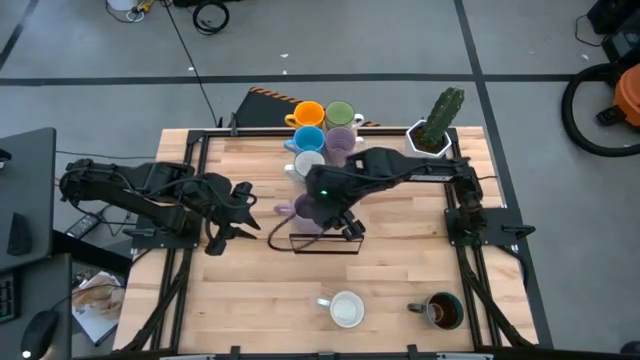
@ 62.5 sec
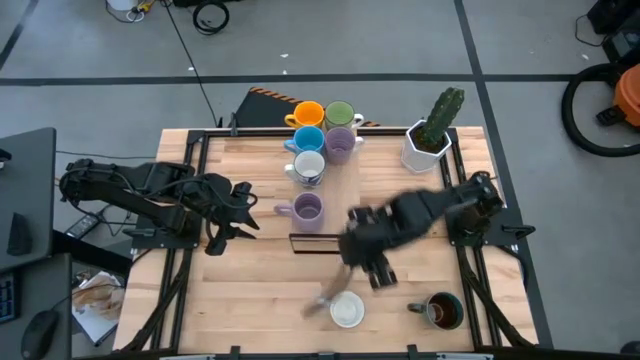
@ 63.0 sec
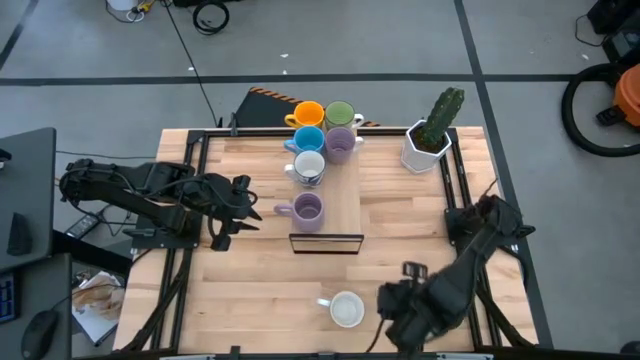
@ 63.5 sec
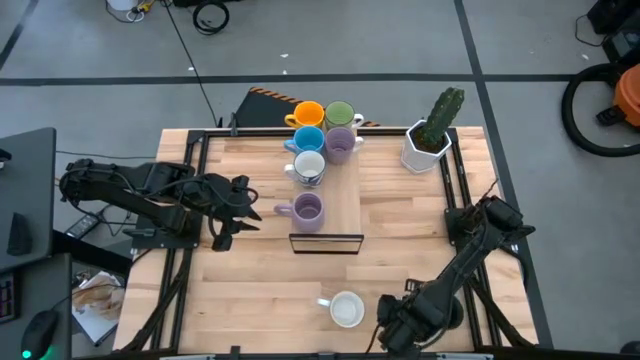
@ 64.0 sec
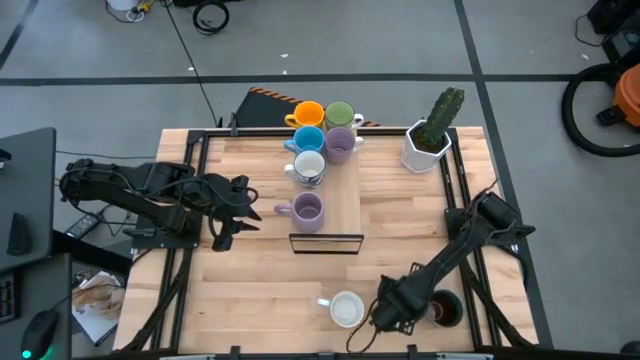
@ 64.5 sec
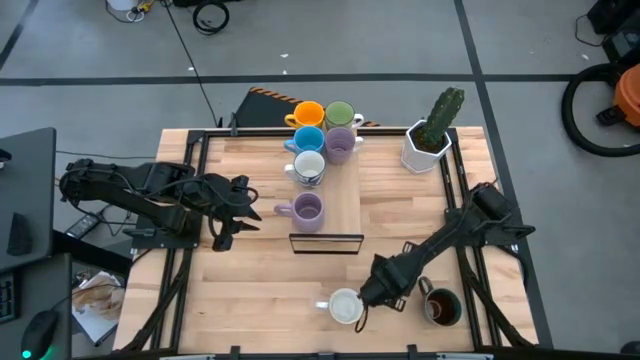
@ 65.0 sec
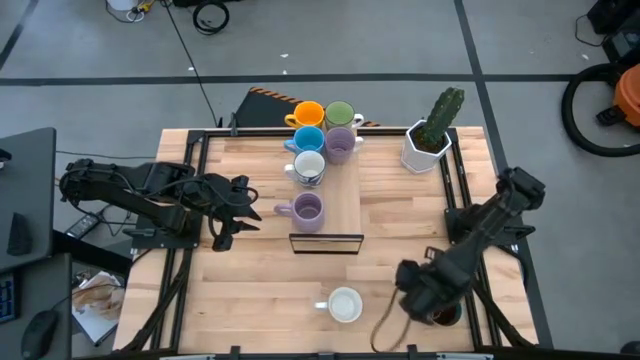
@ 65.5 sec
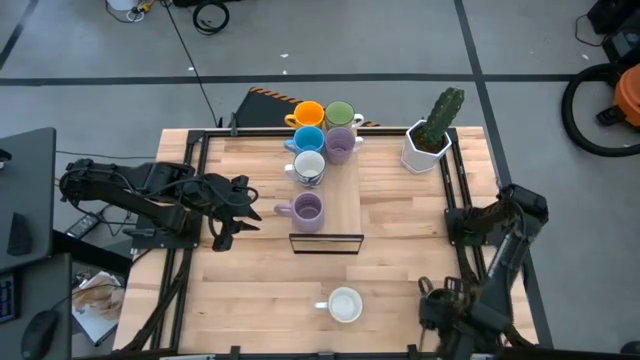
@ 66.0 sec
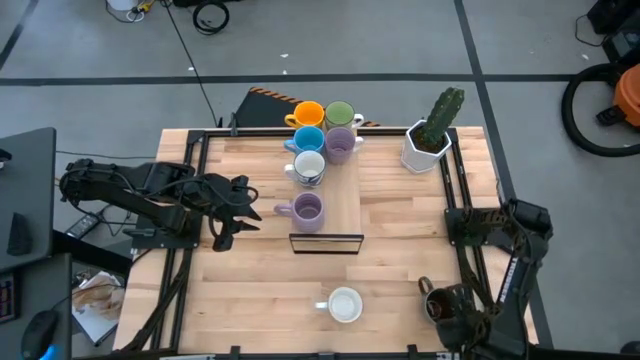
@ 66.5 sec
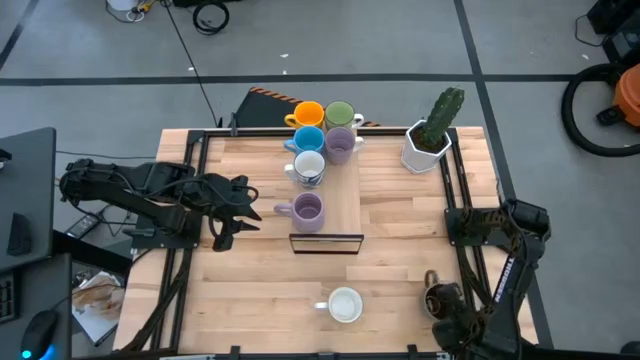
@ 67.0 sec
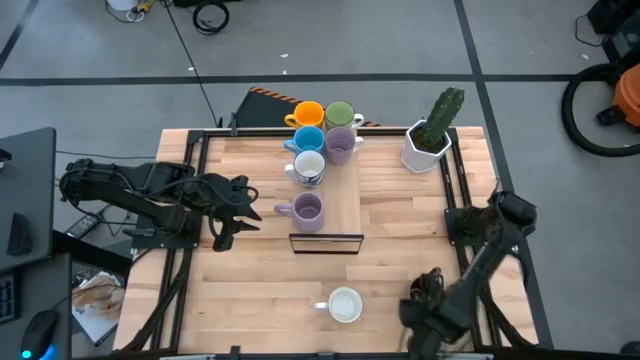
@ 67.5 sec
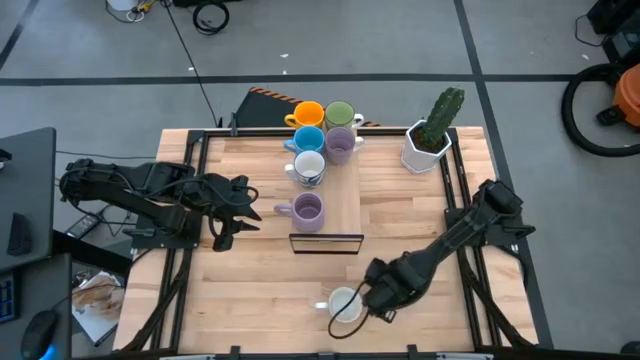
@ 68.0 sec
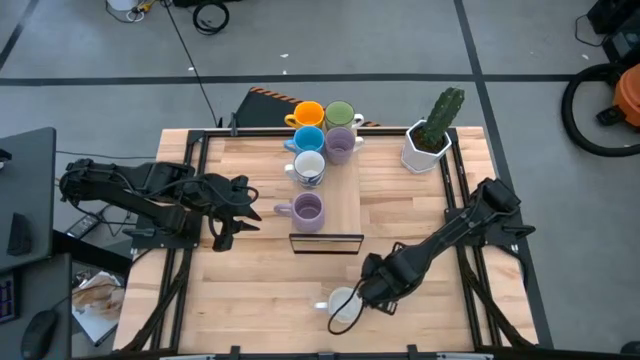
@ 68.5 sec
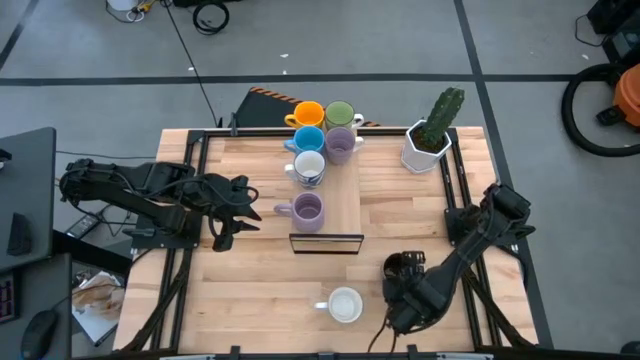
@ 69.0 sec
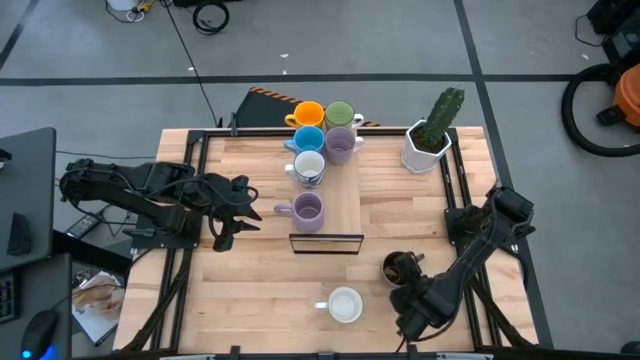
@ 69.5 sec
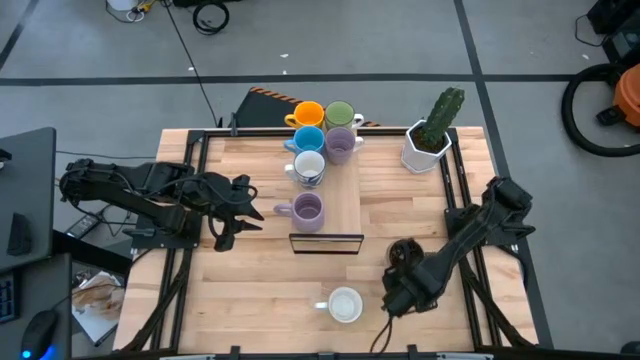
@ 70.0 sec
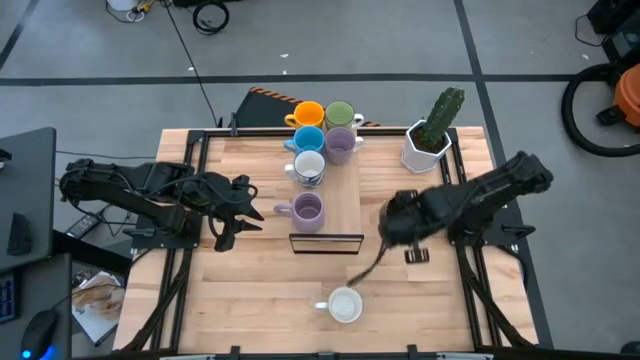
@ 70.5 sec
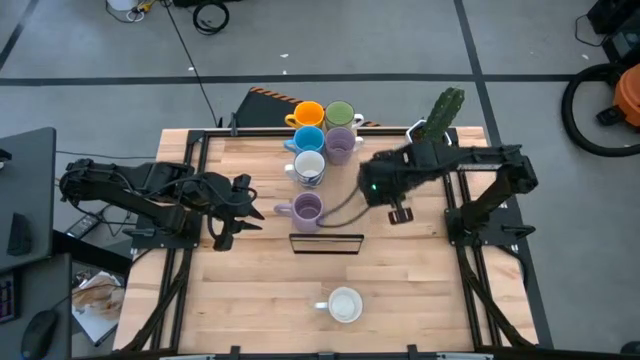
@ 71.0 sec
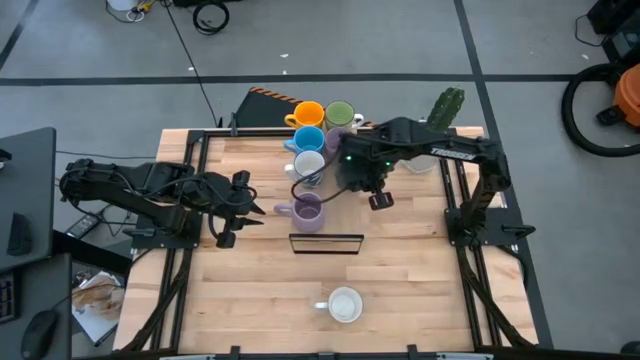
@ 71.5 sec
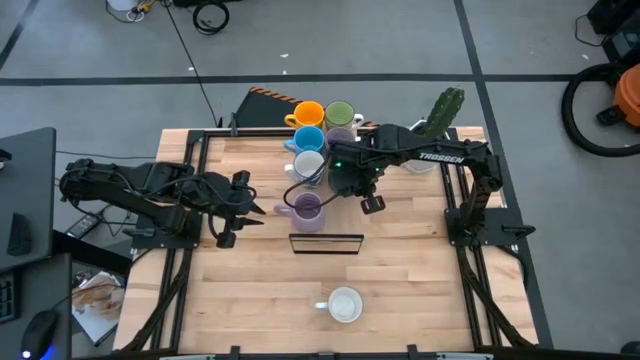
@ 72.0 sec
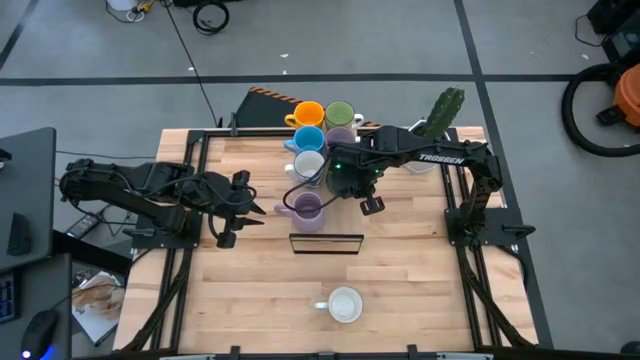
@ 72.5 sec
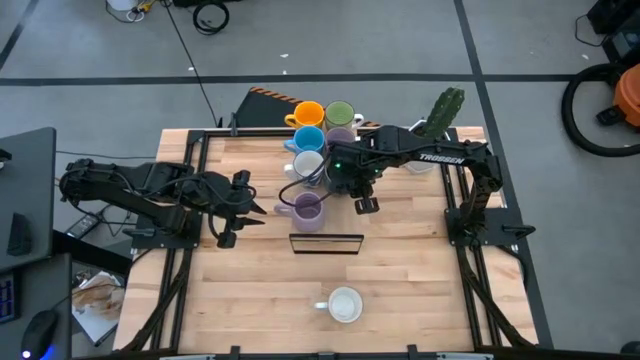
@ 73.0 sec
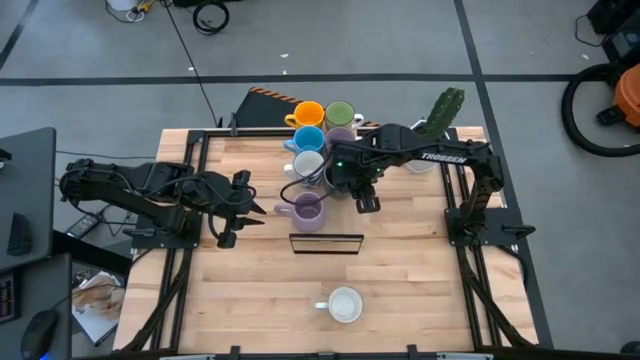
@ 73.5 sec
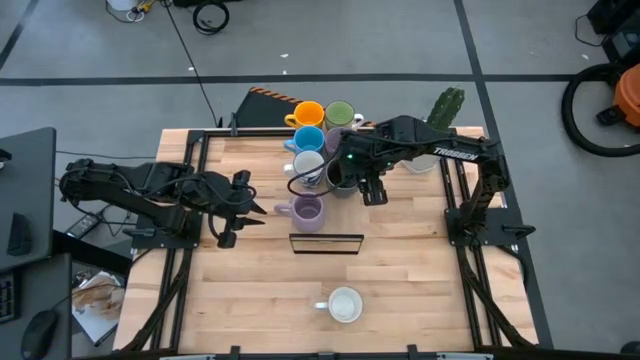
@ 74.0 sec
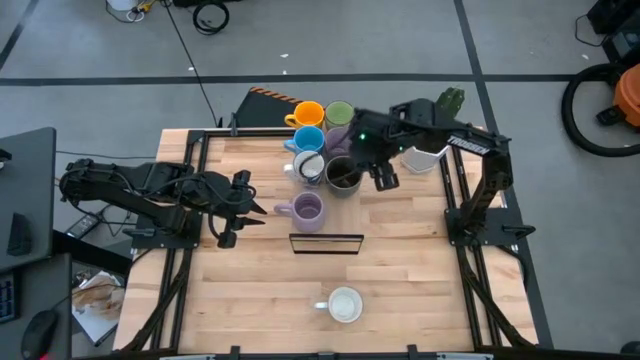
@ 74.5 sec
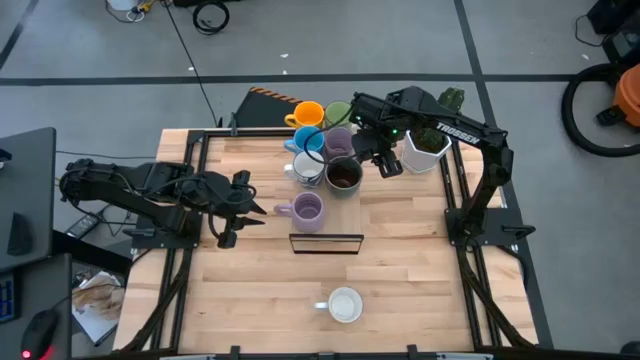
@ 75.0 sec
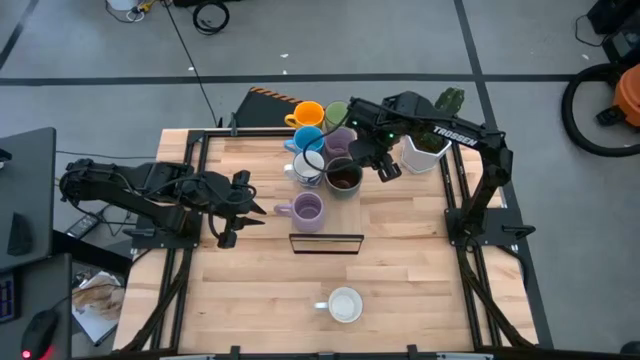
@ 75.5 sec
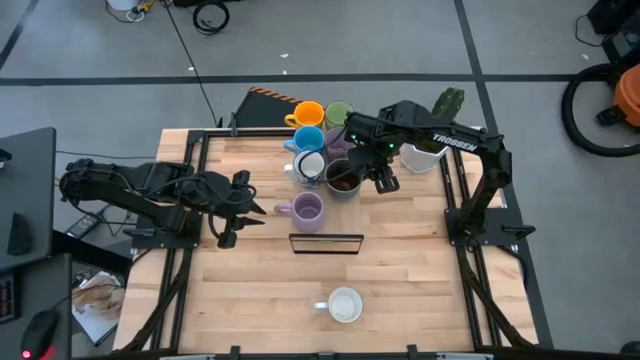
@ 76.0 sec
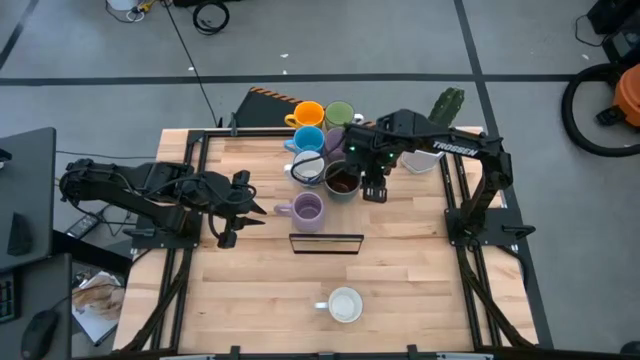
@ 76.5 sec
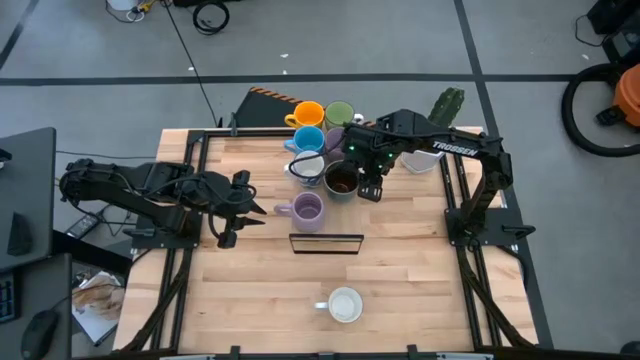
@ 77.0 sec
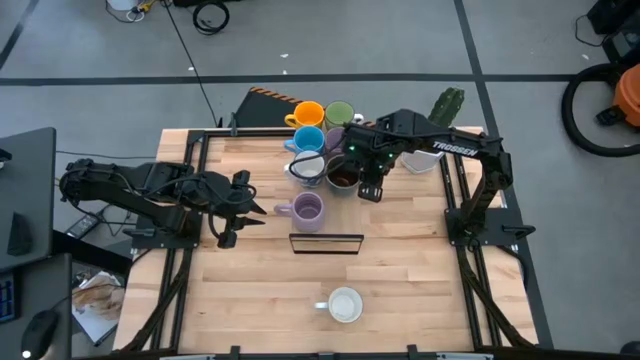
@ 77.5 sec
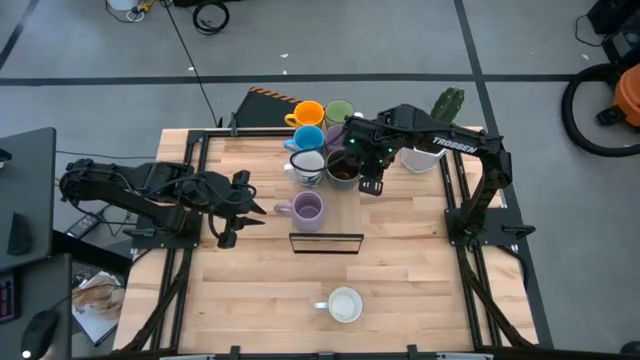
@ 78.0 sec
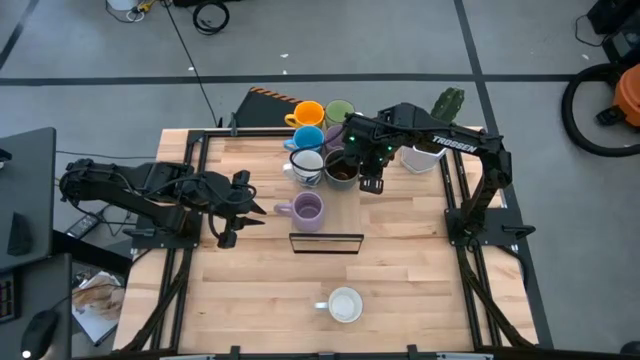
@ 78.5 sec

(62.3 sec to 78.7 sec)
Task: Place coffee mugs
Put the brown and green mug on the shelf
